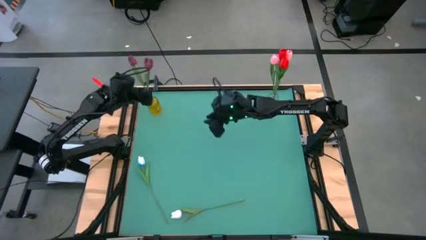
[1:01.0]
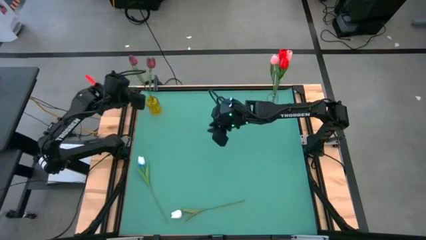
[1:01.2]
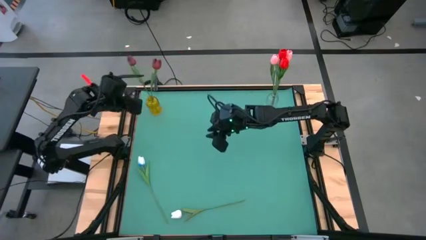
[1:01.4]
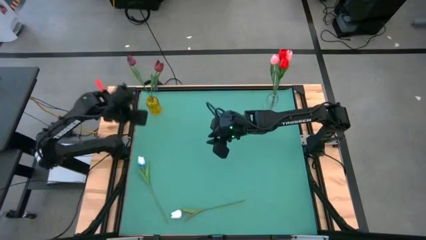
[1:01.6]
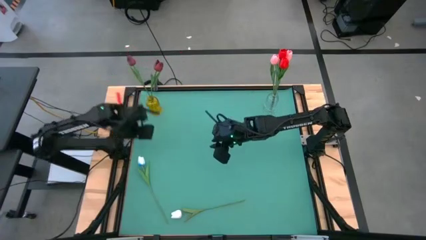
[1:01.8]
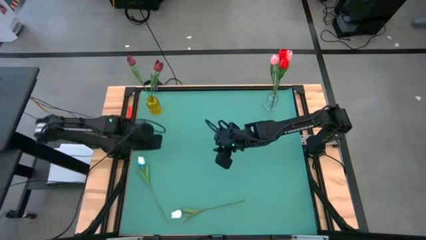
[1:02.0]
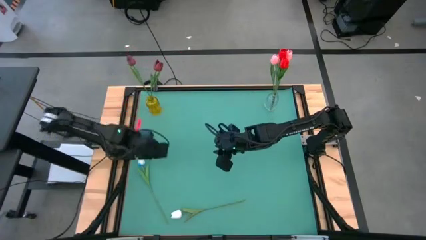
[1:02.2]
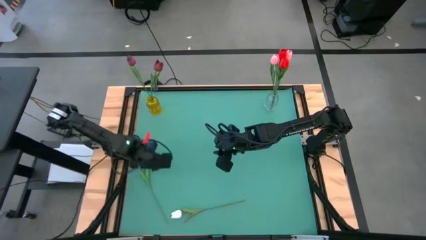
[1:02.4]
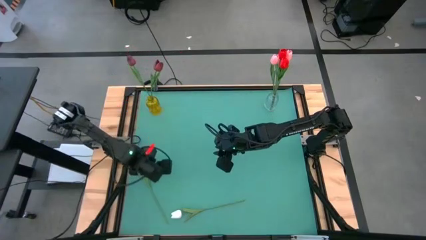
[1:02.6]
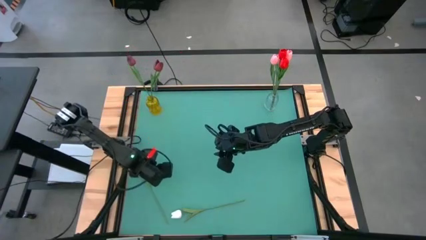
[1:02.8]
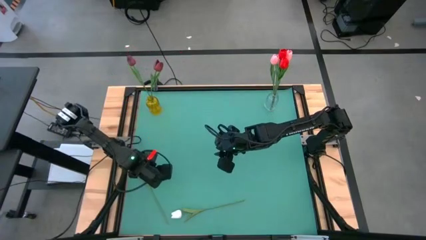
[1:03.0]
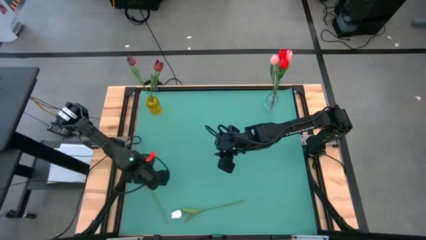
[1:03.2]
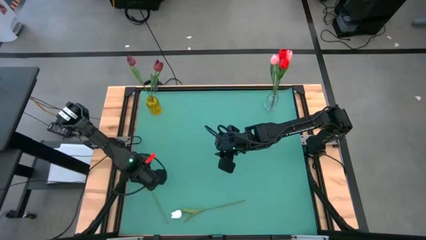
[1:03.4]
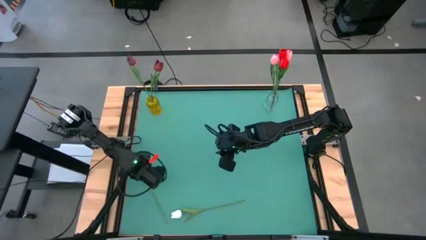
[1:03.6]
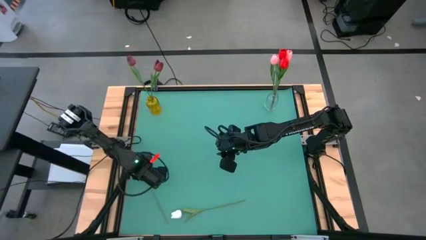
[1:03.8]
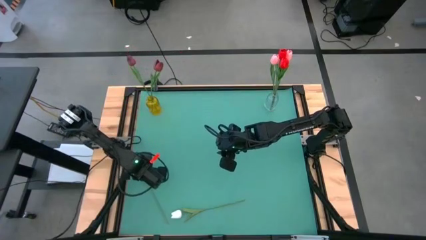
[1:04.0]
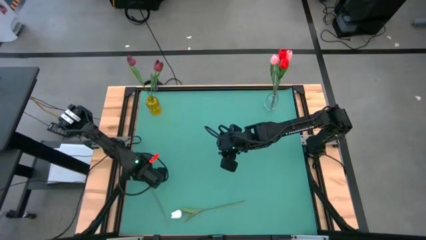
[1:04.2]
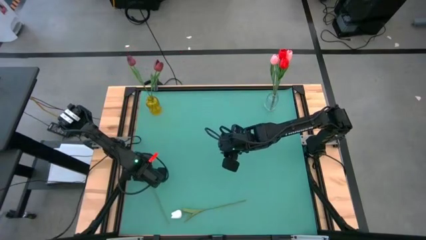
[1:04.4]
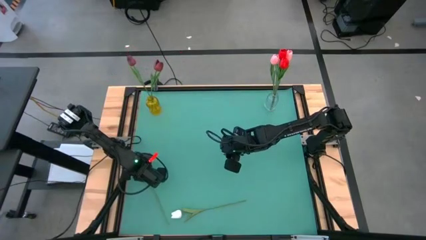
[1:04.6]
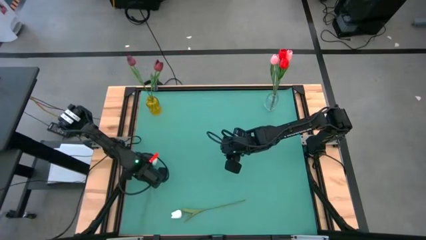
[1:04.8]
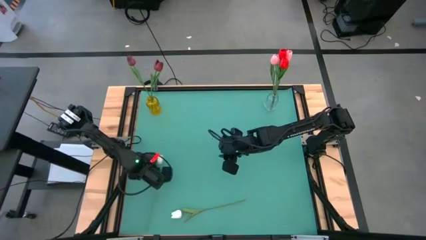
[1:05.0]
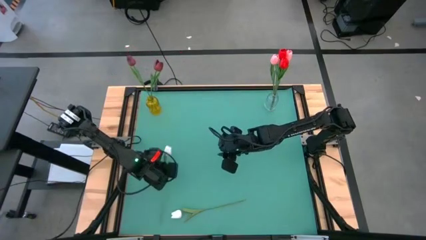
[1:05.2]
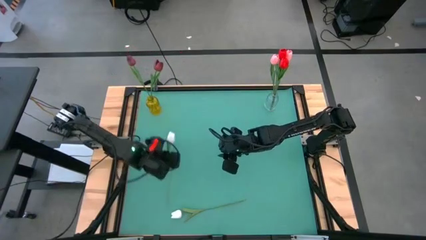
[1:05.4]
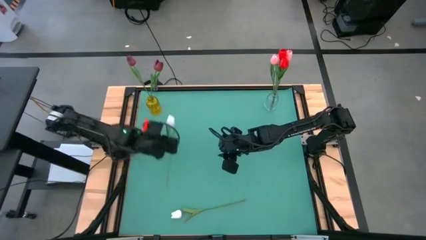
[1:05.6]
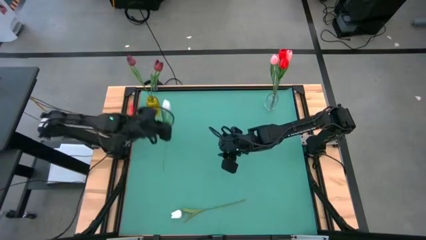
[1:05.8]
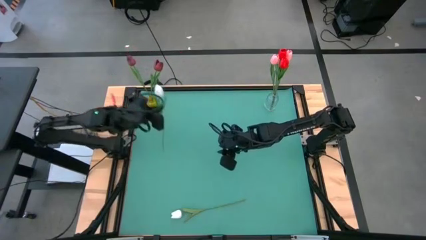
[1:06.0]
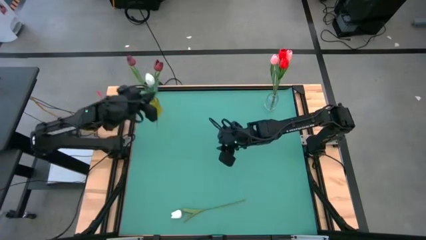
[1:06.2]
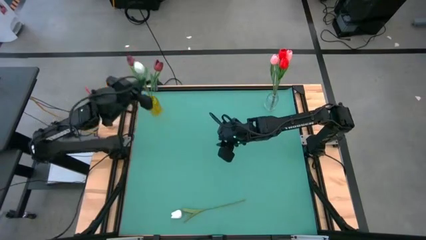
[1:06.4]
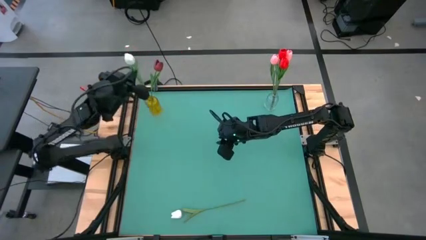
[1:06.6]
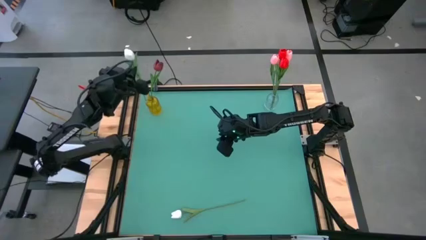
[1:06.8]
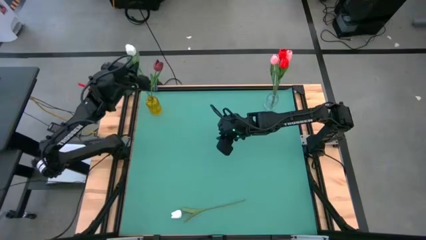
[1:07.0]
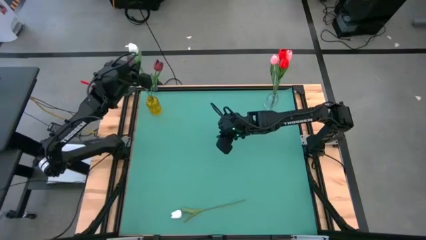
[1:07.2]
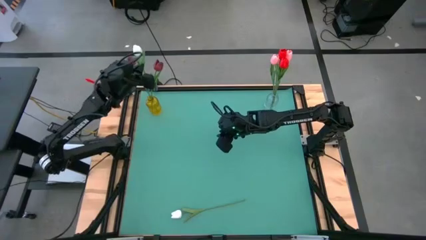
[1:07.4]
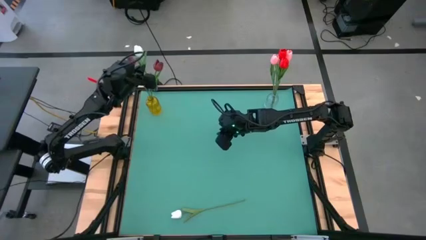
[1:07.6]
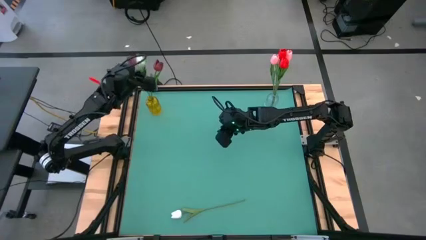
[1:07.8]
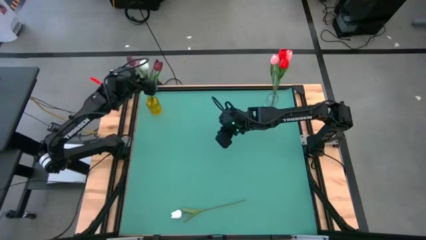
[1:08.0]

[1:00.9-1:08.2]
Task: Sort flowers into vase by color
Put the left white flower into the yellow vase

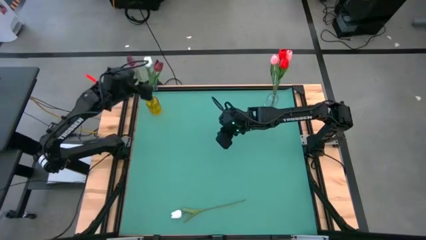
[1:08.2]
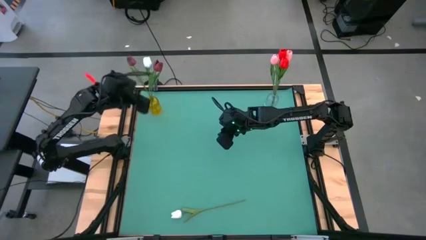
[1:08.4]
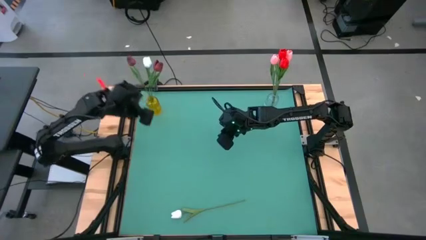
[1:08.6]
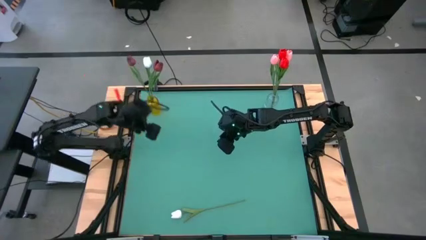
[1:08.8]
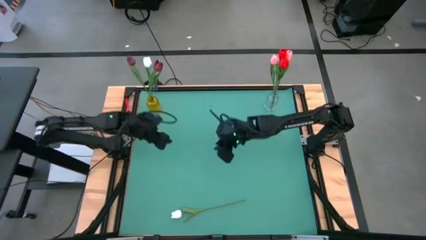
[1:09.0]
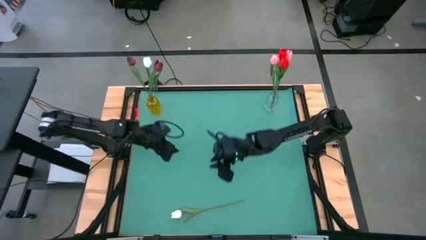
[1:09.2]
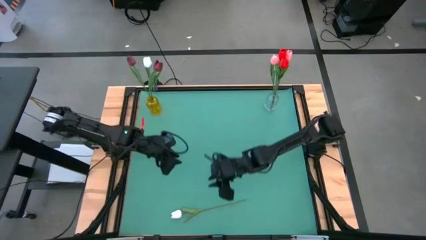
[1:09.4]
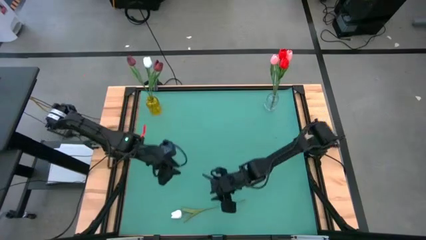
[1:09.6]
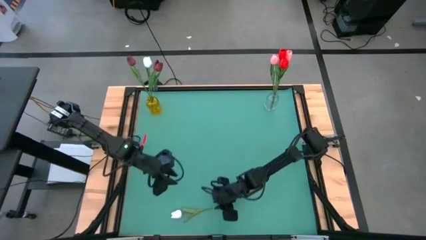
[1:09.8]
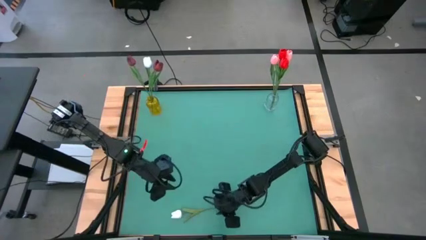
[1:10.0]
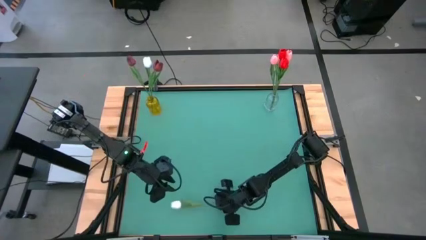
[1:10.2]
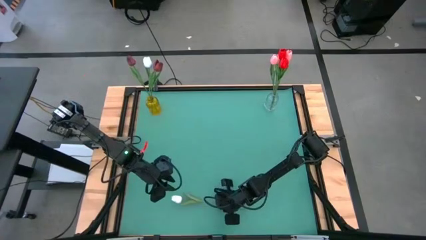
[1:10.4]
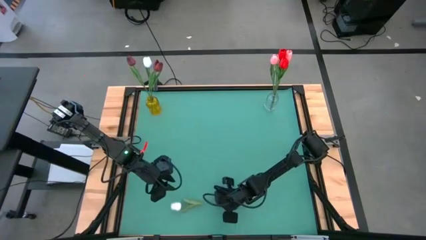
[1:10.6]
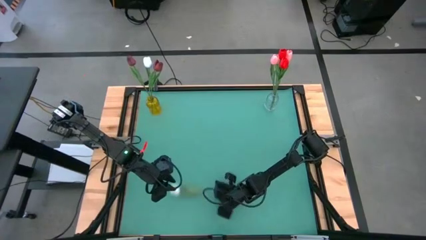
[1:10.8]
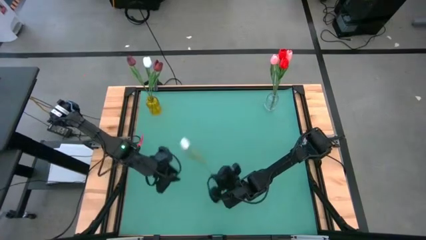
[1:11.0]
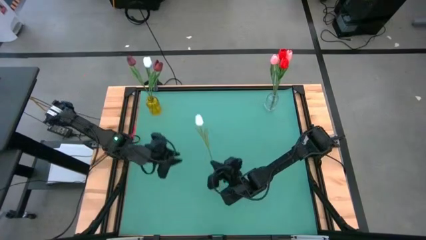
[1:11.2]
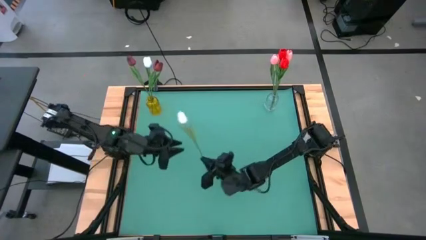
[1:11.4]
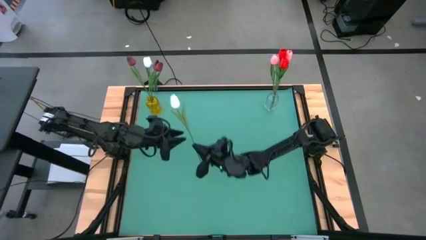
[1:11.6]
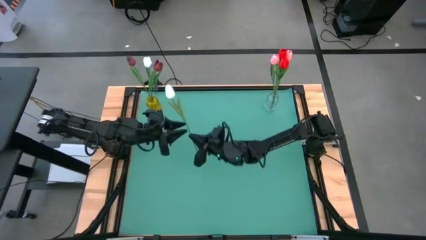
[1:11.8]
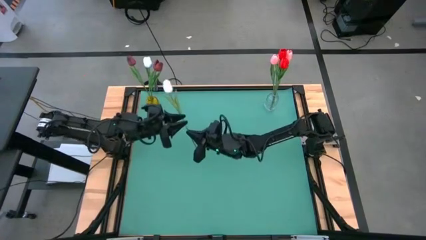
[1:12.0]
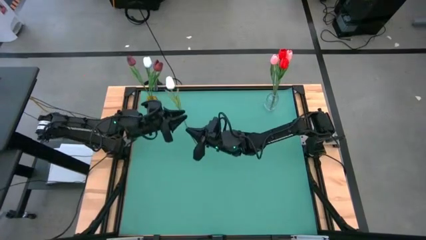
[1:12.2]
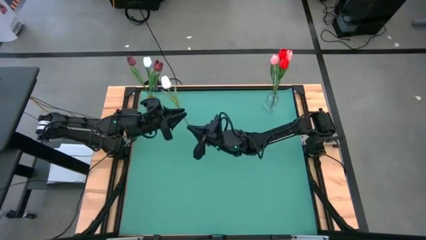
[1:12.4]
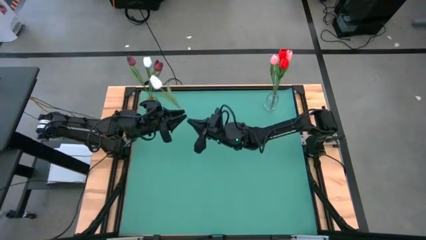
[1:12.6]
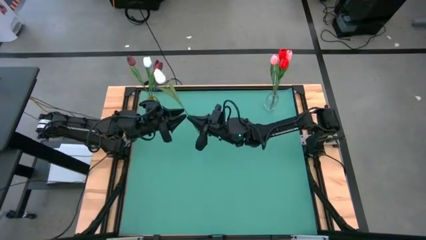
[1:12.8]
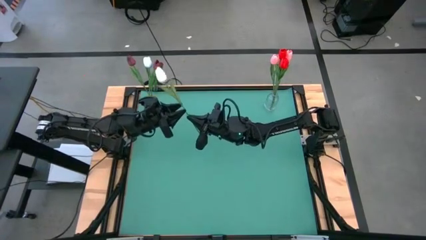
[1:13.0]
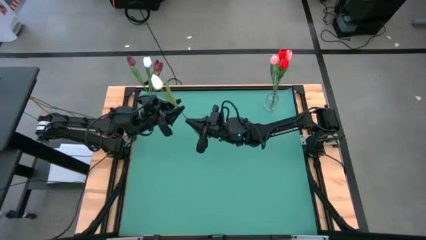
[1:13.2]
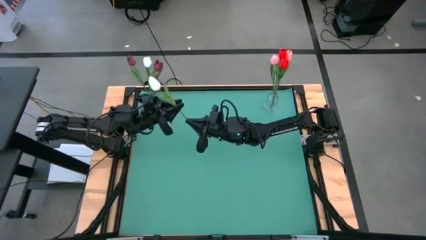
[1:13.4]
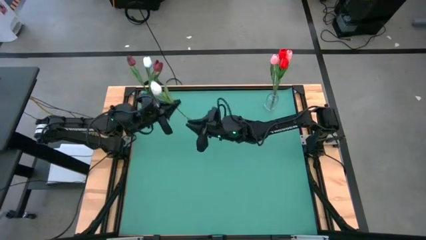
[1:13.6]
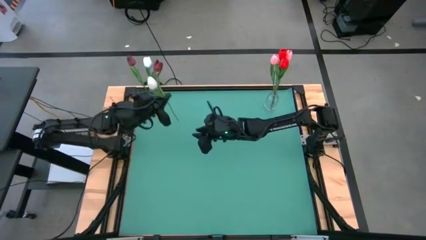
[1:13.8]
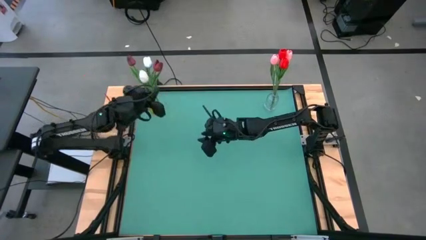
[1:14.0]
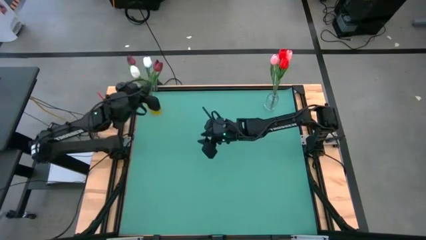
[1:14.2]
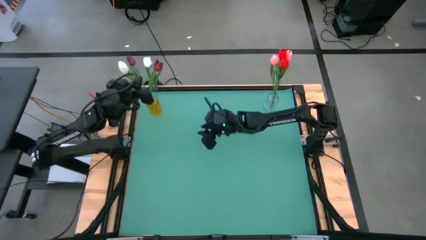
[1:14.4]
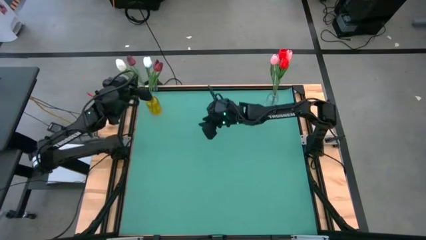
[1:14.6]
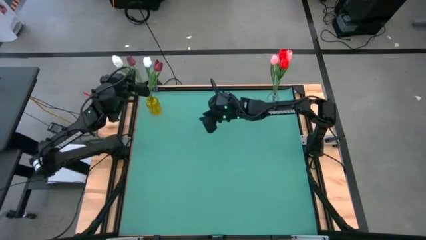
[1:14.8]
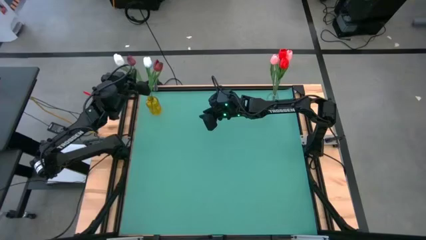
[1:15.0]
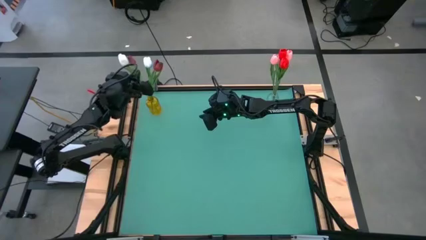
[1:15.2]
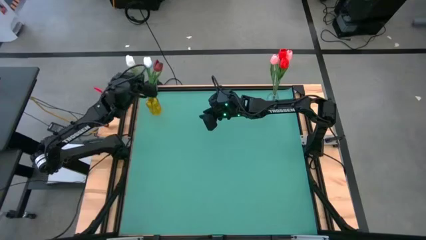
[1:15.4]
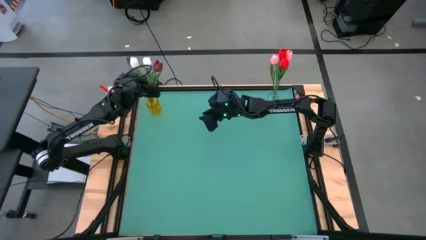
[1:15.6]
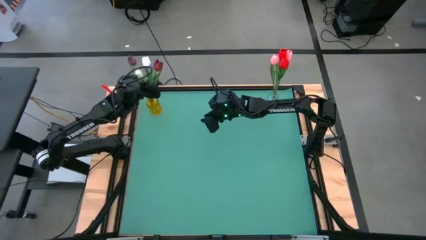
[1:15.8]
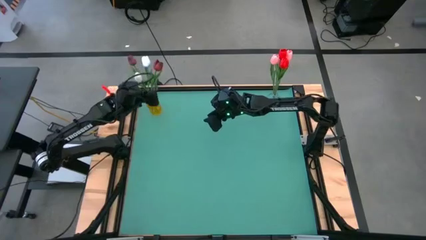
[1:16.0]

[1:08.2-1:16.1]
Put the white flower into the yellow vase
